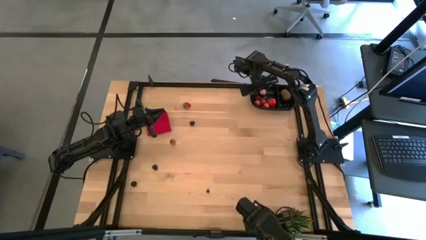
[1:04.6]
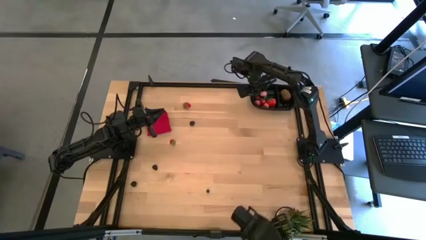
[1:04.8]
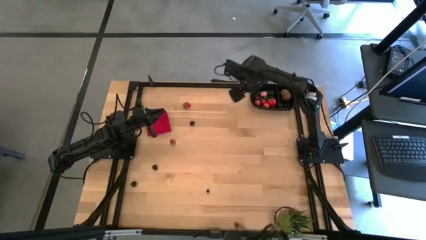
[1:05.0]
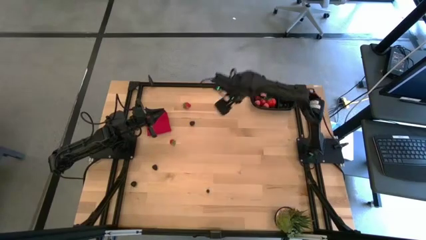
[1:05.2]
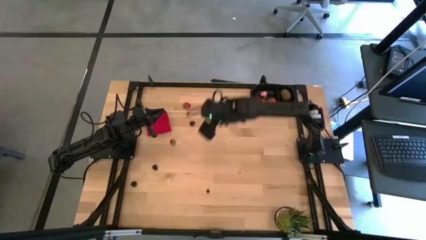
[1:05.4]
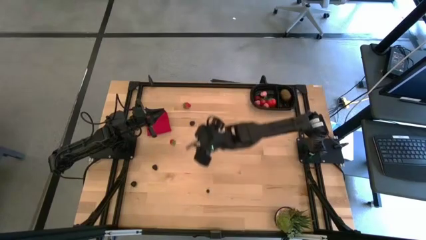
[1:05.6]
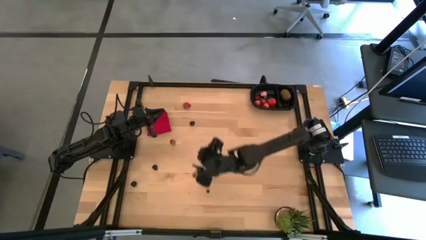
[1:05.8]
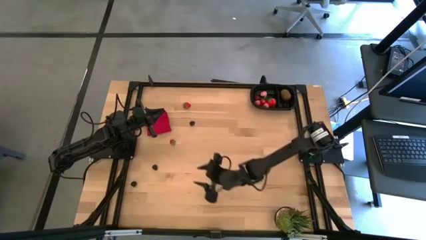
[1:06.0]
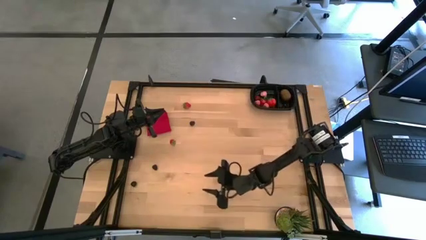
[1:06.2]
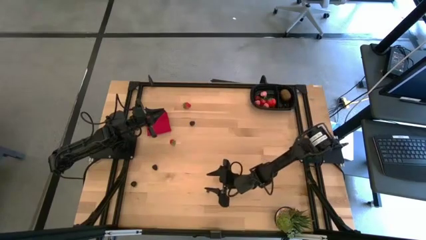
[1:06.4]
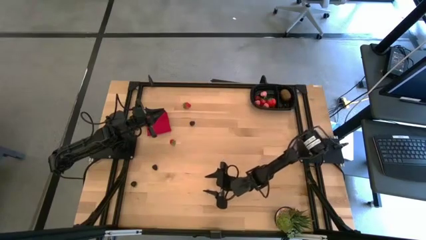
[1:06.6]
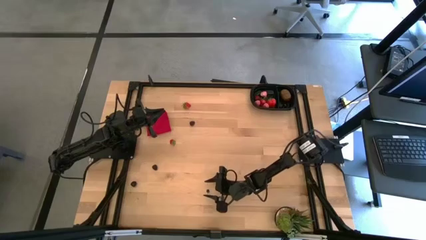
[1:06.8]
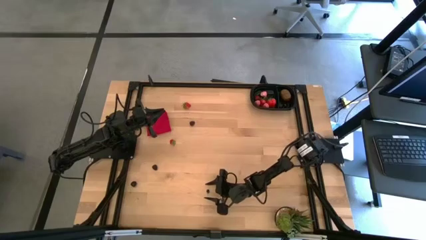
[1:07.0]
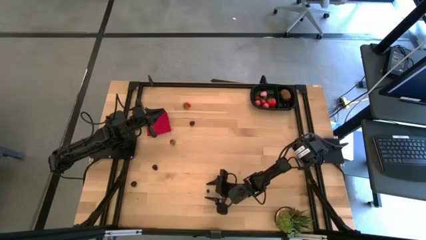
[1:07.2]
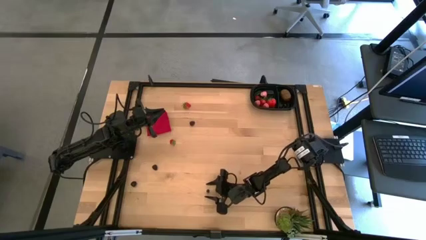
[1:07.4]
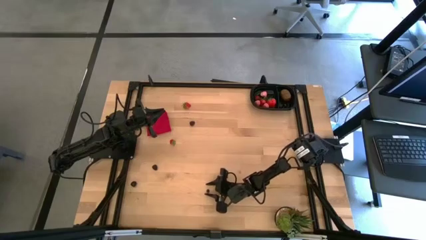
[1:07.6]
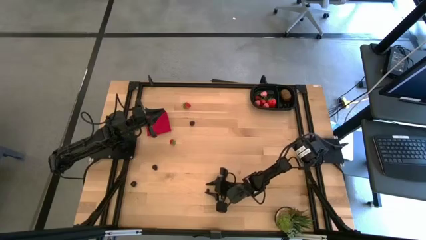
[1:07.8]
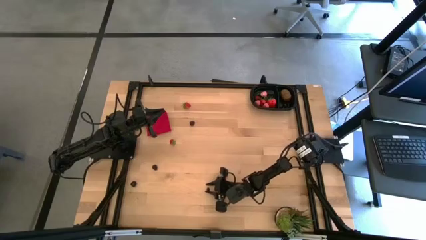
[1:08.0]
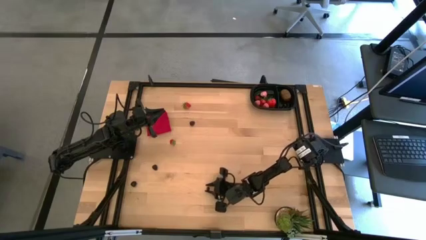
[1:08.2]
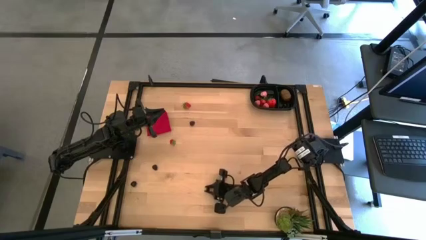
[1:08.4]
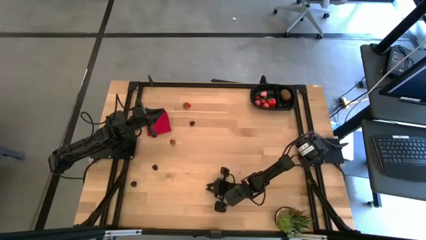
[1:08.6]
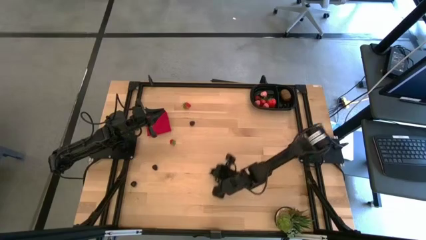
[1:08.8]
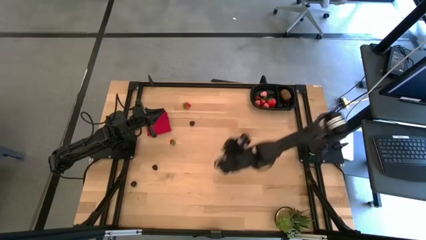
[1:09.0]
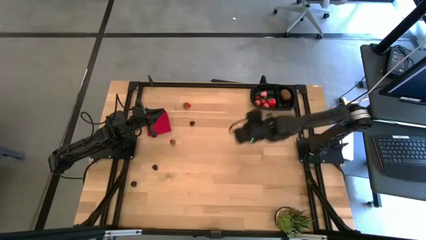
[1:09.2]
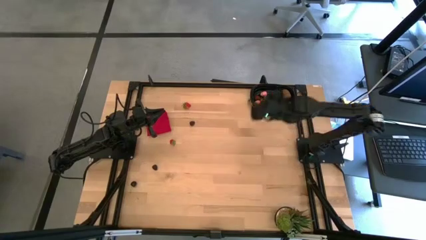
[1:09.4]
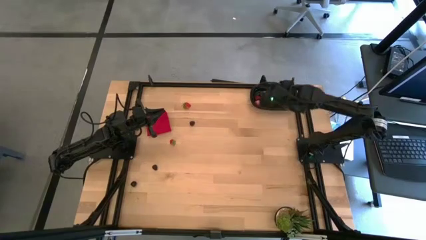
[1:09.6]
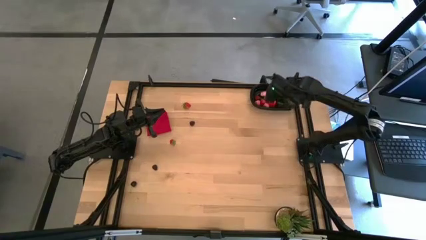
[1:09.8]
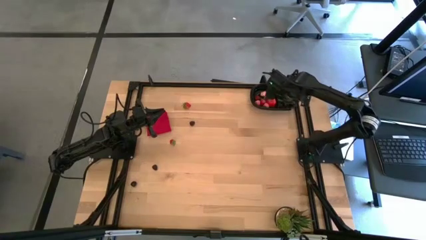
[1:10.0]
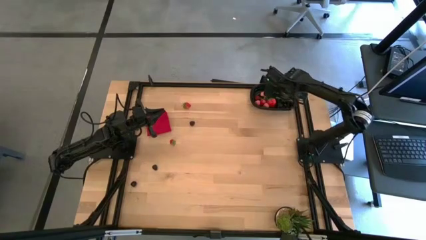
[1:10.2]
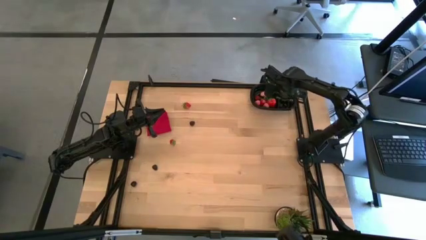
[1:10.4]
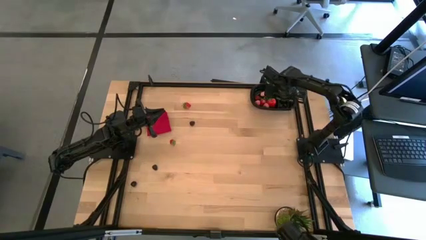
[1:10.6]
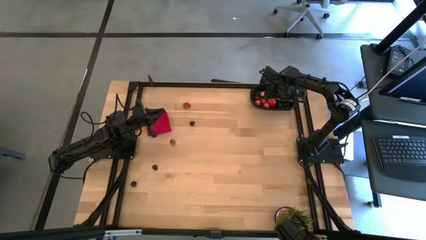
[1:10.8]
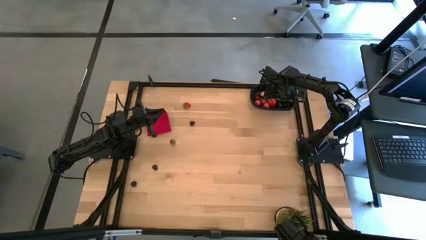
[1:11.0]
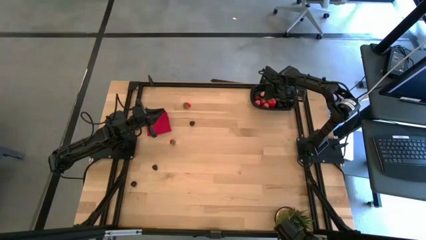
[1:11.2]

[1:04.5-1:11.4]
Task: Pick and placing Produce into tupperware
Put the black berry into the black bin

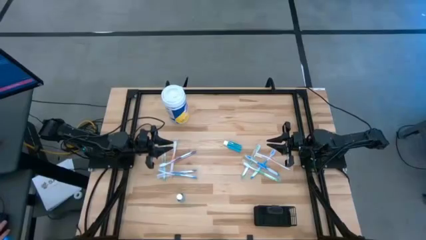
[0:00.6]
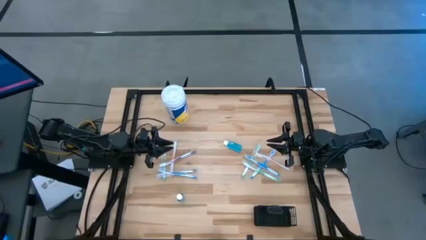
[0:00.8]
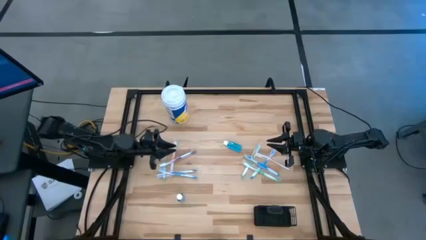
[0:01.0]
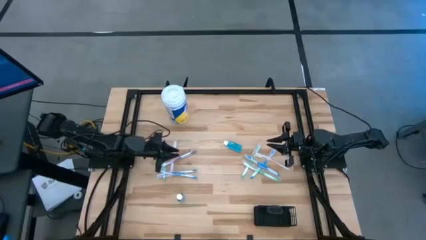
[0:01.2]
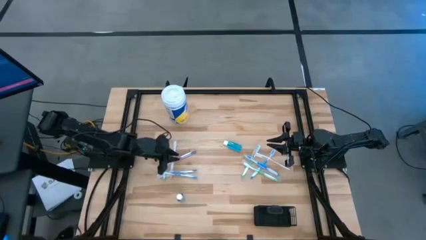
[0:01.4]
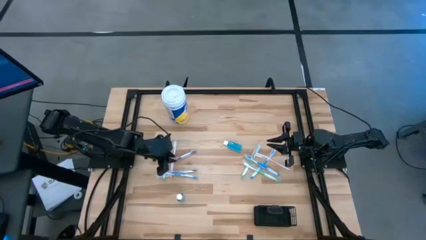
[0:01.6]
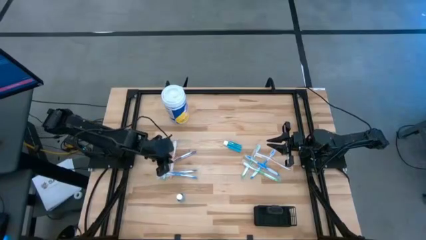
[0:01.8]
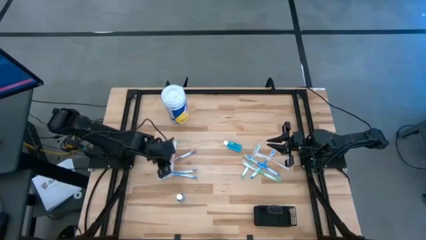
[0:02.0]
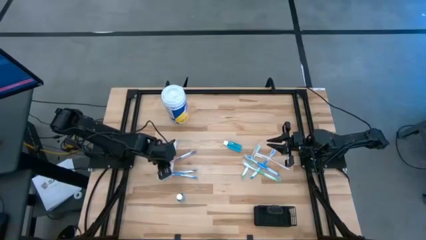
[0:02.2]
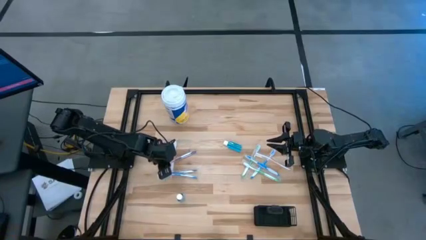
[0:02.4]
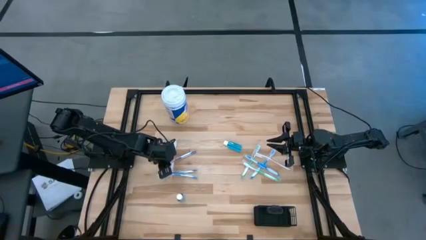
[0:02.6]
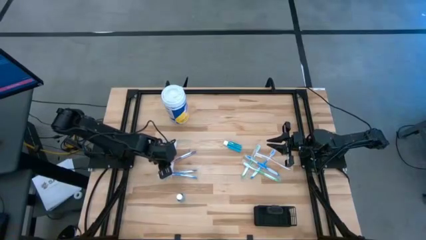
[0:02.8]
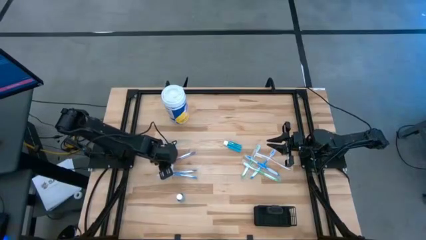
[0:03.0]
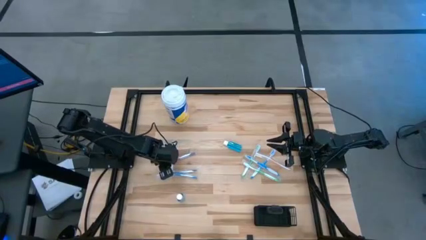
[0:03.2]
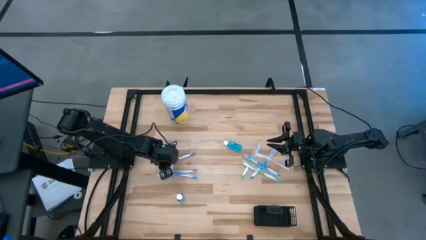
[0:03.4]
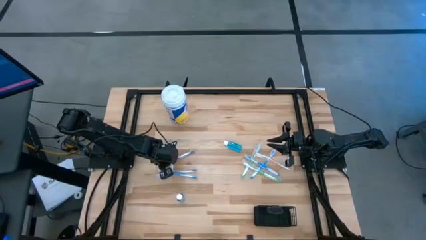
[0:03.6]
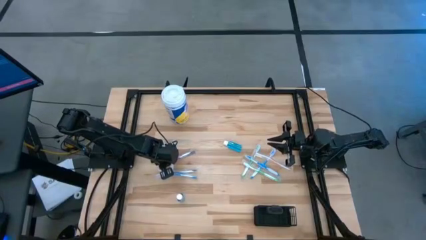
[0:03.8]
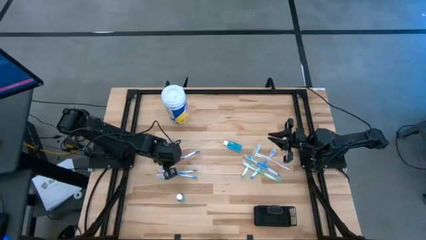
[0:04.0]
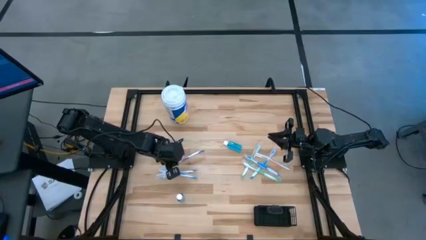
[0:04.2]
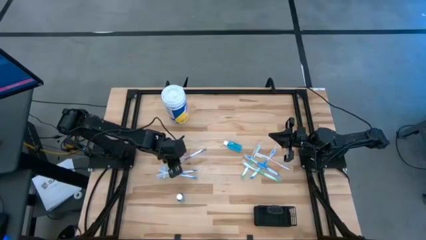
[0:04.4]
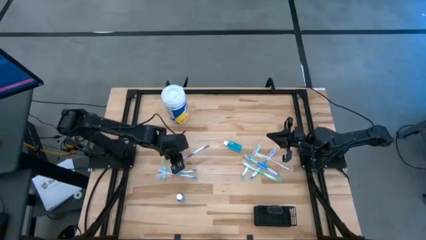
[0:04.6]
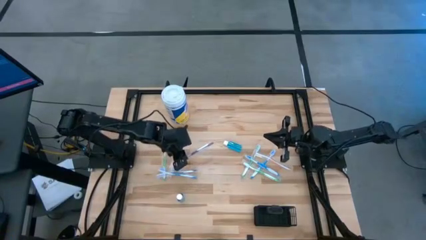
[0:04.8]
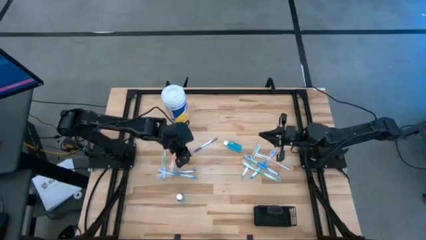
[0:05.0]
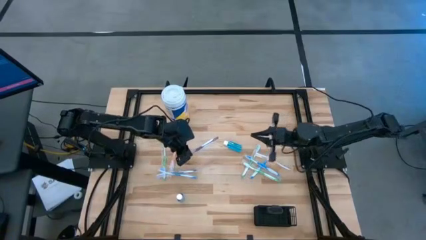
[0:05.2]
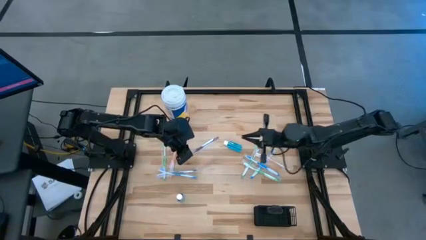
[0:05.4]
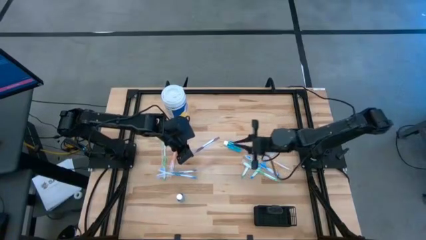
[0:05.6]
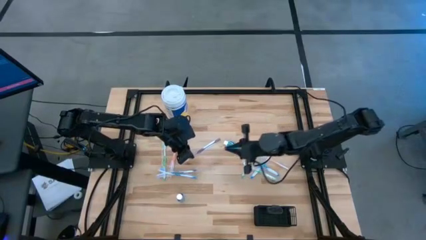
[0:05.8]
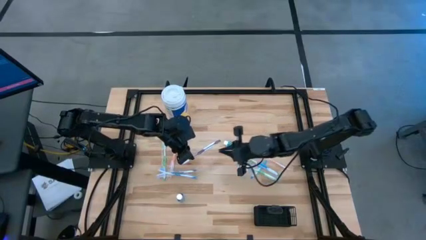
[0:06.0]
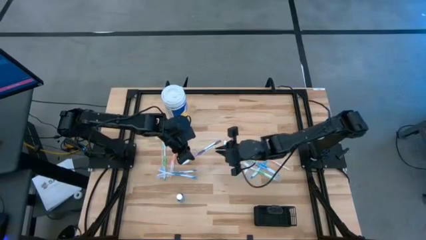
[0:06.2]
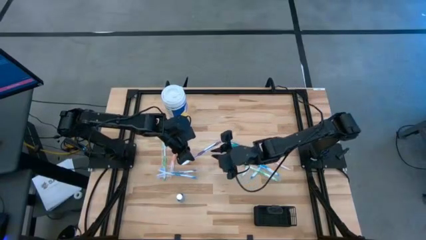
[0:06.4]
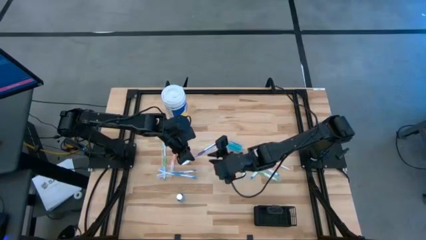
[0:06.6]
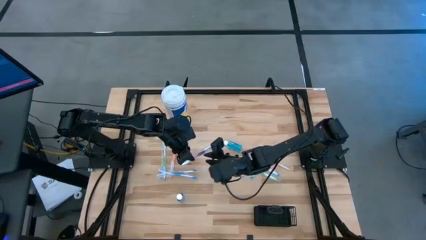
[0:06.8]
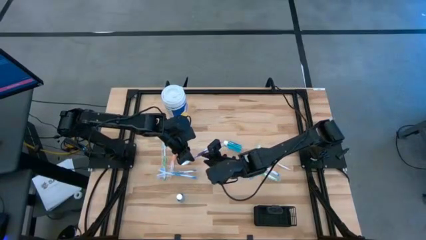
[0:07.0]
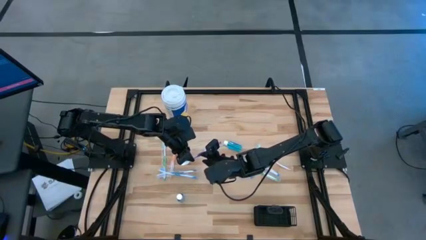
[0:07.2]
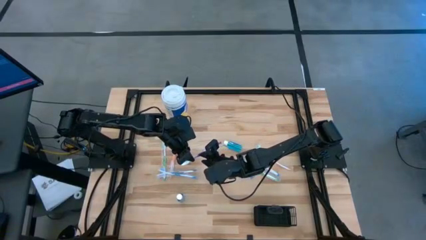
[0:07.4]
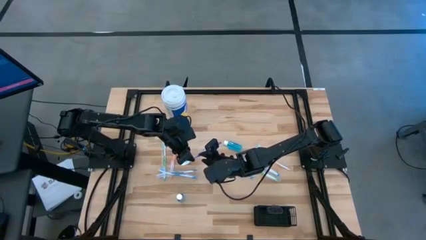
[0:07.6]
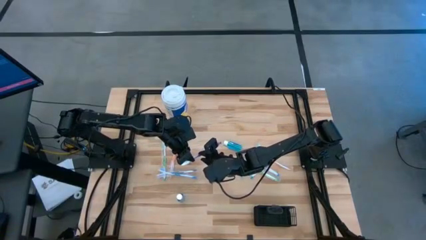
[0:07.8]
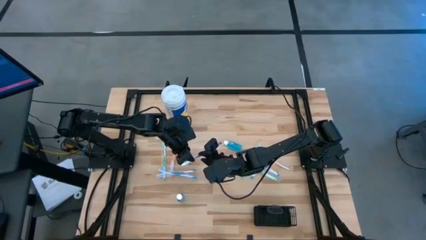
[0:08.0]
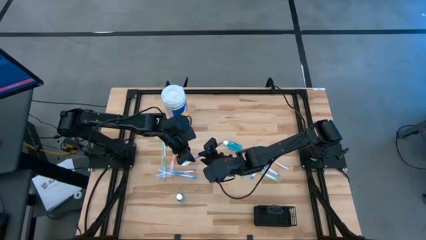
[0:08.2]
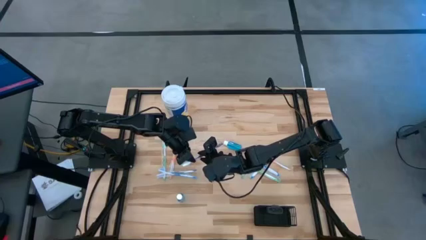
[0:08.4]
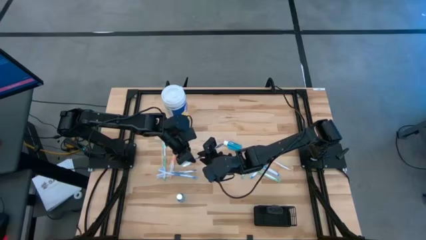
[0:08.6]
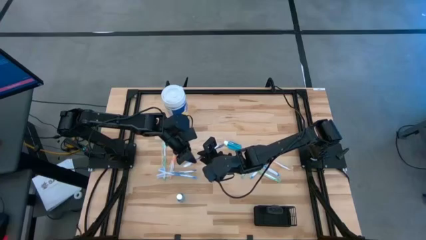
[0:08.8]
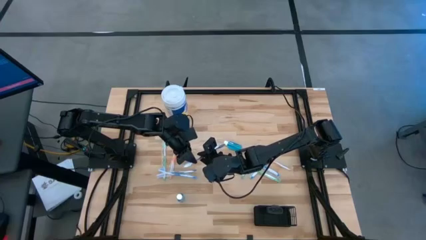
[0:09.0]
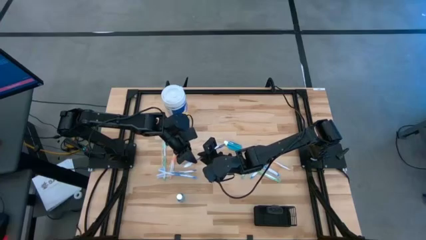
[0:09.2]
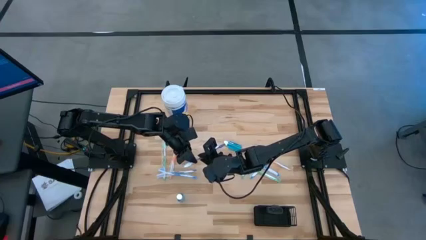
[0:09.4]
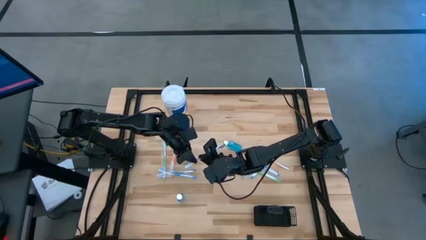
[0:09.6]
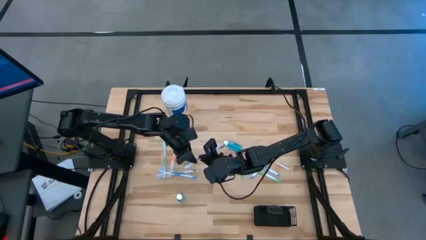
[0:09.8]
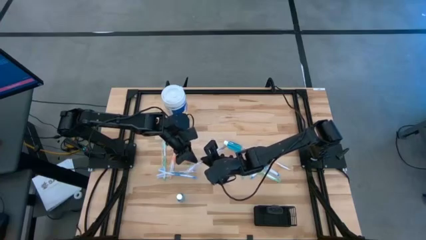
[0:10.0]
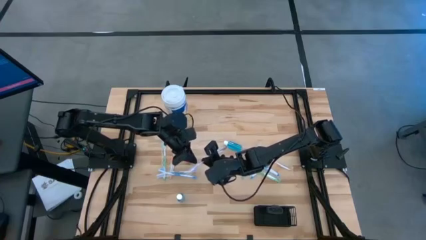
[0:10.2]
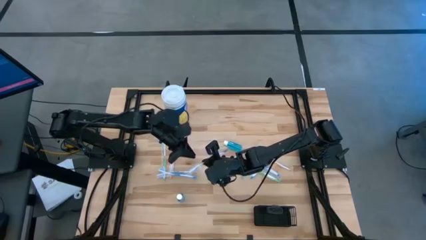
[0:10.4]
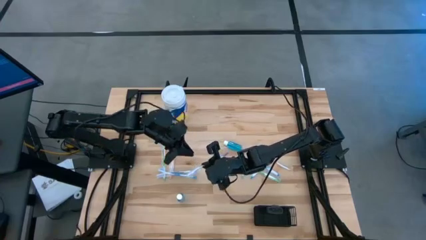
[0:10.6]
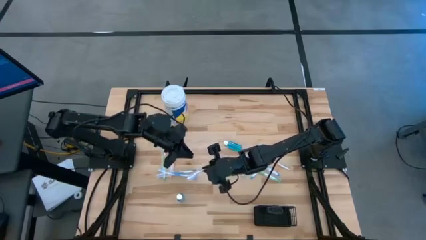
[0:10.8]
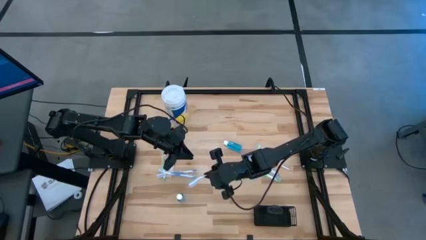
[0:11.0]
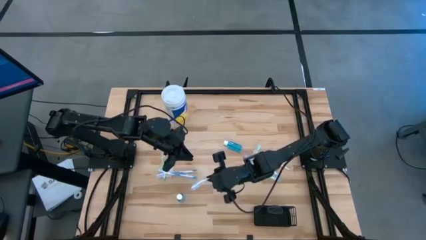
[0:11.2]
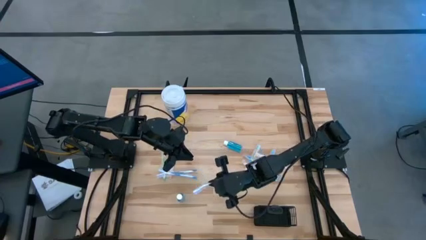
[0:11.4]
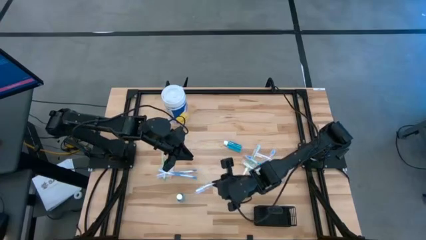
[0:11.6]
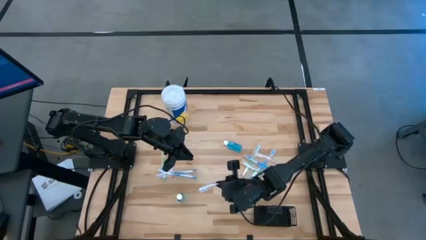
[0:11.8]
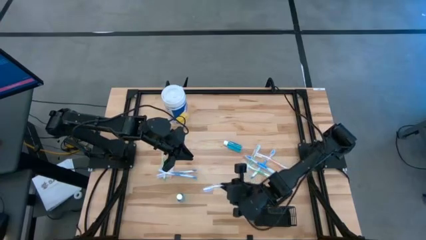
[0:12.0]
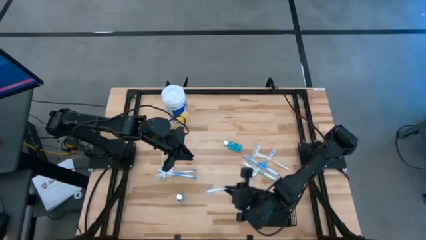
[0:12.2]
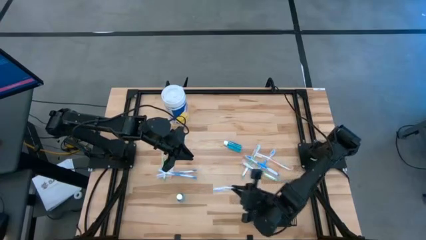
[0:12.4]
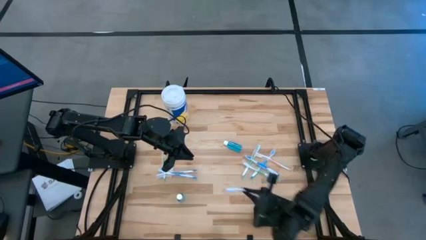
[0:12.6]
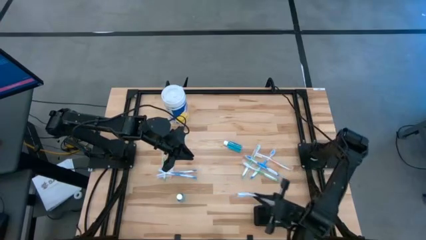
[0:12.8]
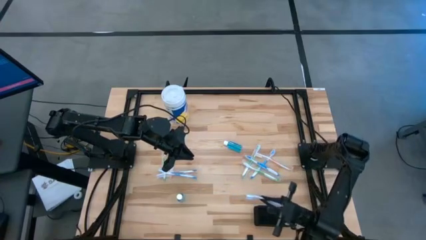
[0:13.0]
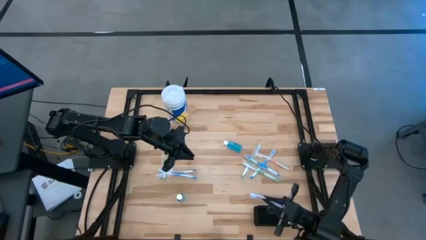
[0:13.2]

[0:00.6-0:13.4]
Task: Pick & Place toothbrushing station
Put the top left violet toothbrush into the wire organizer
